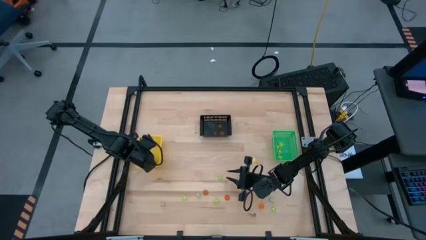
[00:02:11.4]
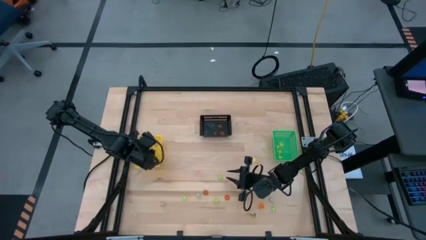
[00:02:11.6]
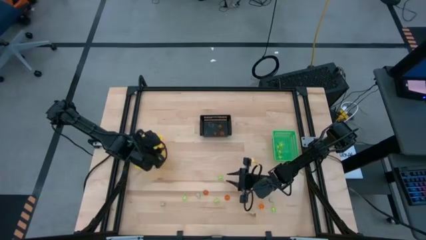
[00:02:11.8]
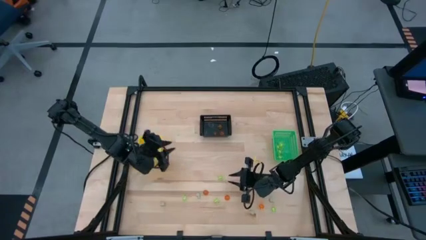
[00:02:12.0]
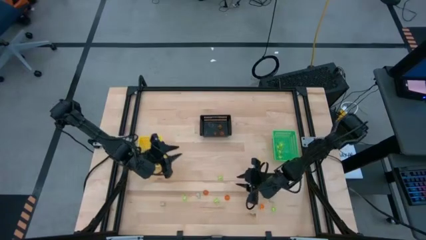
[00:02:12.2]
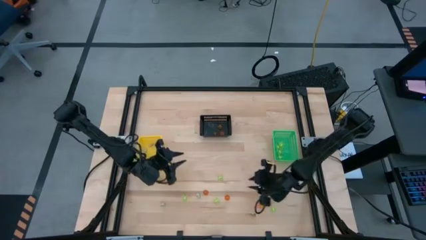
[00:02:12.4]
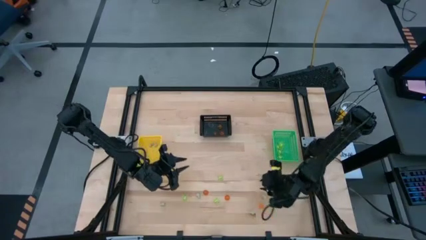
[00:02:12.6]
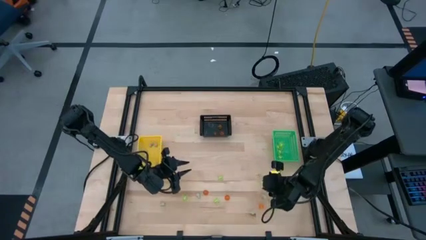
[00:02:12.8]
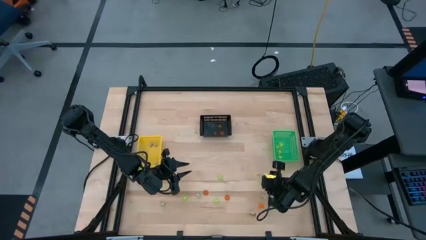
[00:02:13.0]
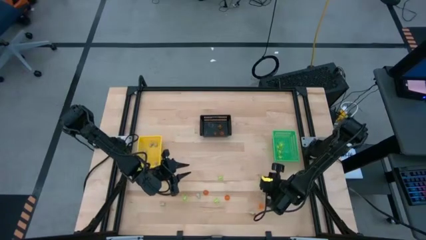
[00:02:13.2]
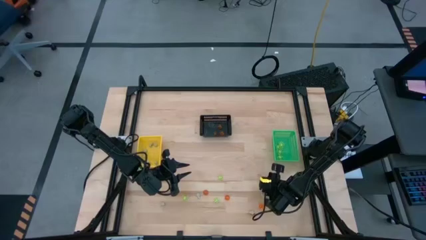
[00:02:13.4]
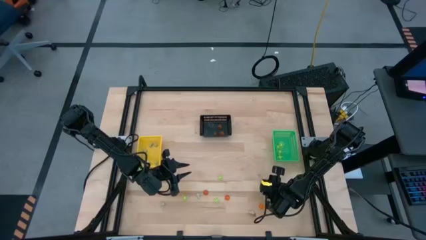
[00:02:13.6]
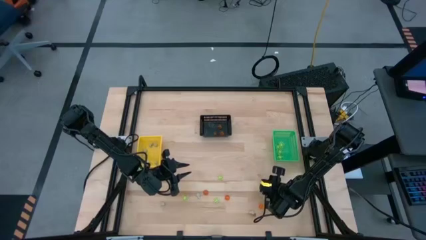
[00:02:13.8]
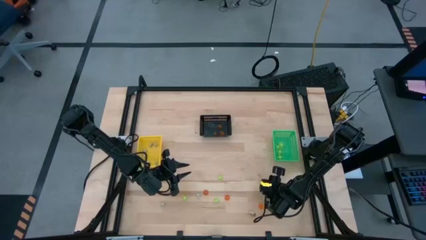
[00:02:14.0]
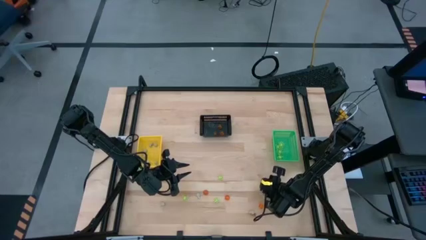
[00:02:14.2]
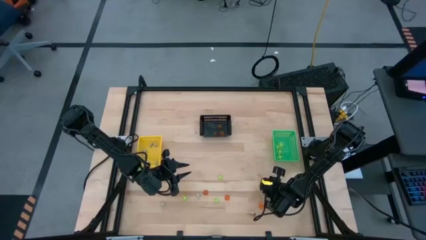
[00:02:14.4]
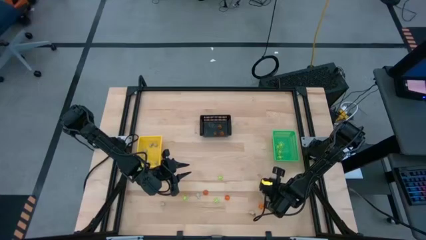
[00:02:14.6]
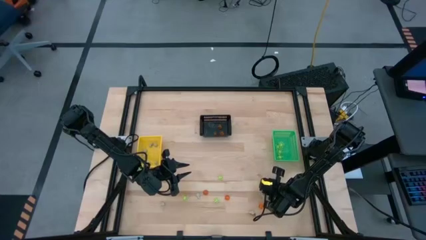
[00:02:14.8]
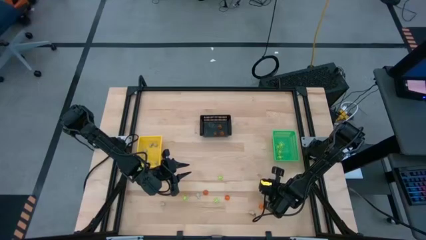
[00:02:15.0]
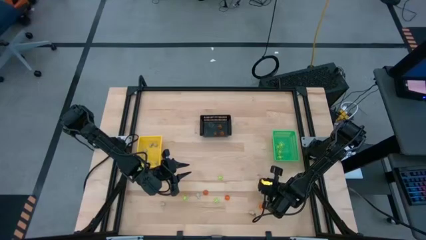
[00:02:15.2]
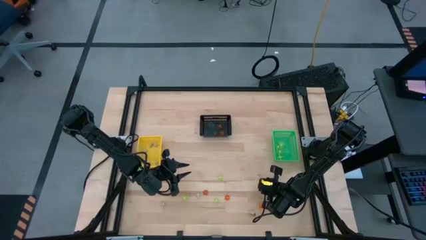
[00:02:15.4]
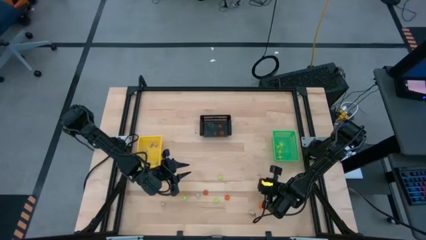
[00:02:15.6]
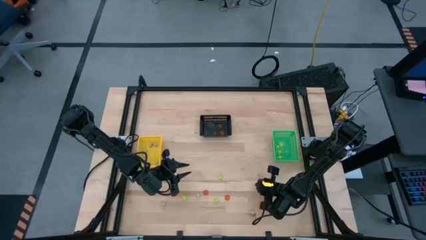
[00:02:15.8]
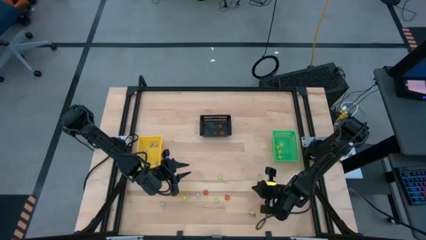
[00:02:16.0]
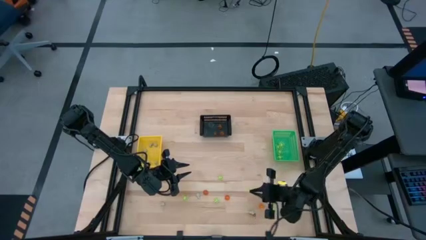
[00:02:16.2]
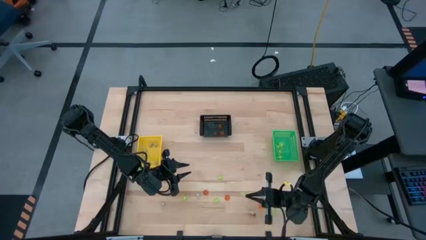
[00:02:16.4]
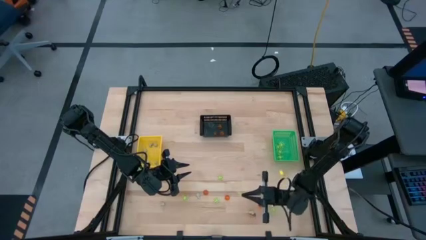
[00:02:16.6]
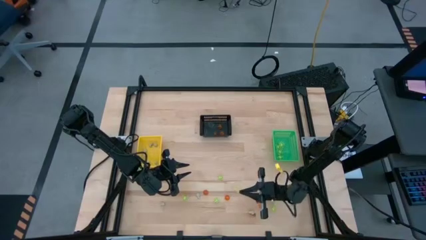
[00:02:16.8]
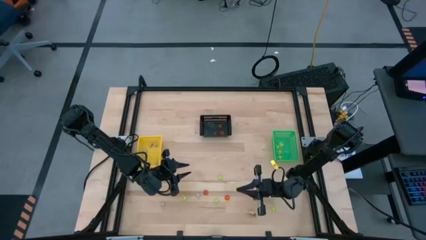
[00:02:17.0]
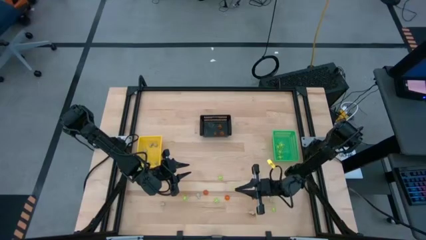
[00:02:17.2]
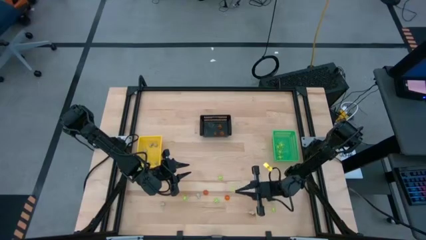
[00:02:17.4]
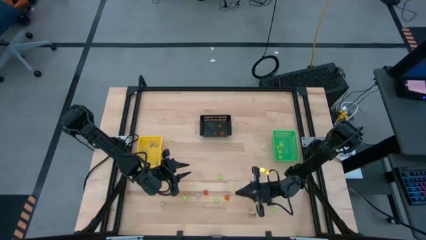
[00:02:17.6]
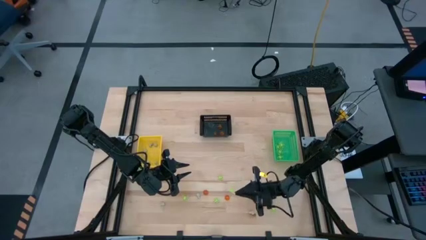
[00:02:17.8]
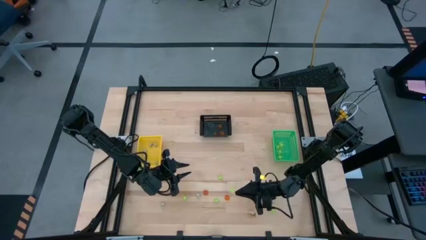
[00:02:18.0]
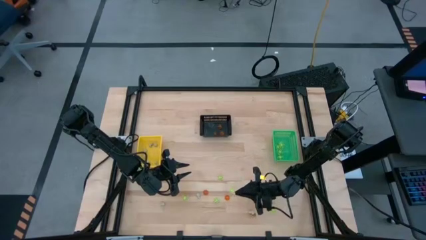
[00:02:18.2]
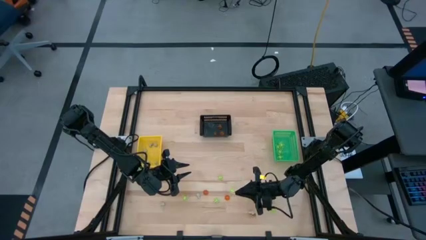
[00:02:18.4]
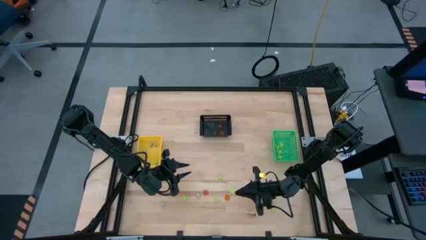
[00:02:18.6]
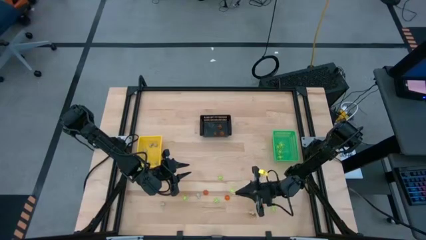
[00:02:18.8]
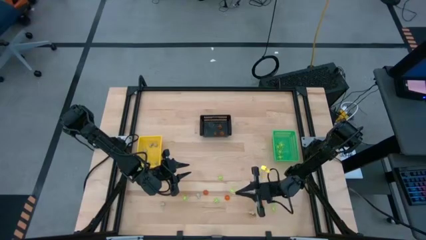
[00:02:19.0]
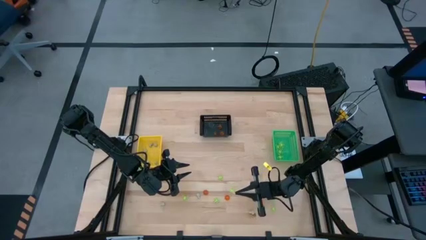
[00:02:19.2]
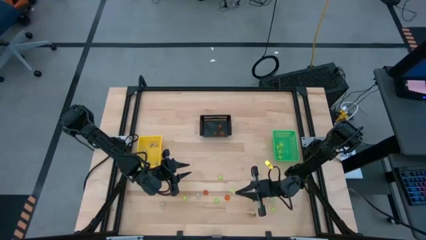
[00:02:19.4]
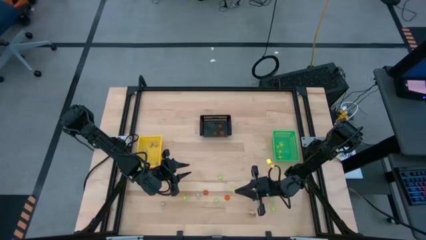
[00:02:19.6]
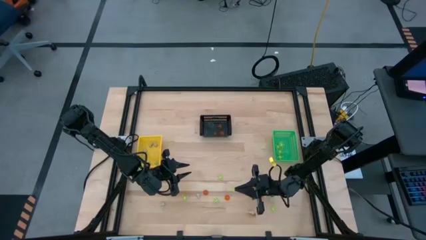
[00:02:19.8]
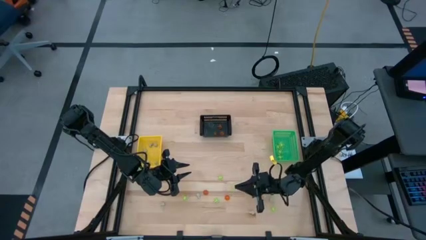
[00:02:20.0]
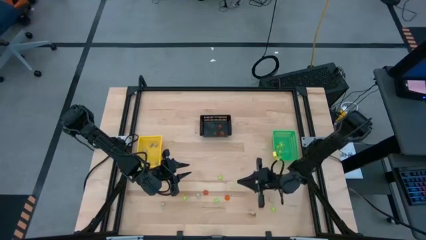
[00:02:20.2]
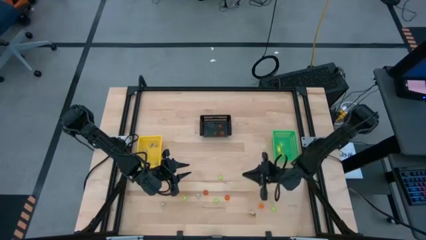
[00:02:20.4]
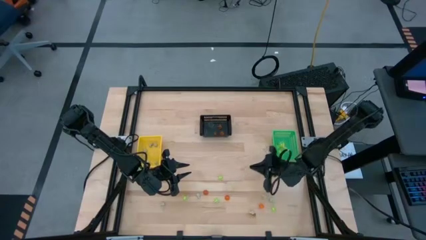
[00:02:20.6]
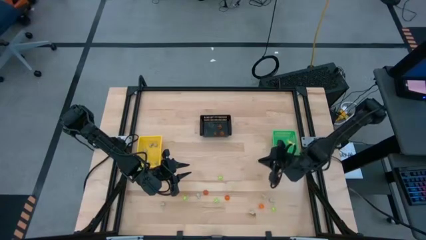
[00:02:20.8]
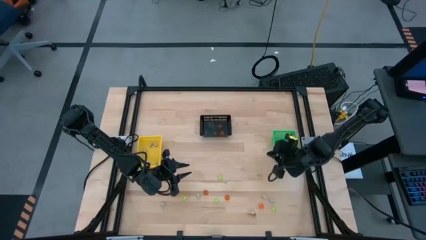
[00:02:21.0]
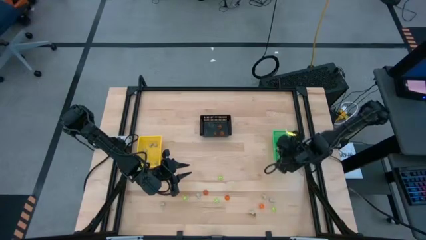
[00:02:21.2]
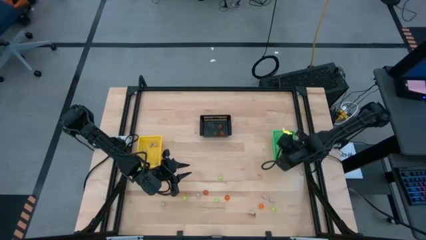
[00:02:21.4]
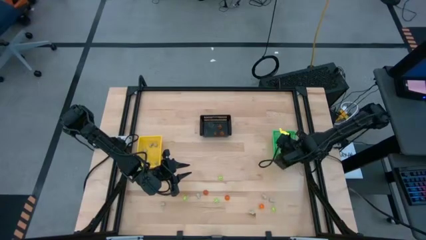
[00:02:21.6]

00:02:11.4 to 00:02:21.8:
Task: Sort Halloween decoration
Put the green spider toy into the green bin

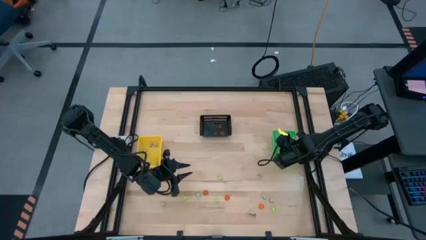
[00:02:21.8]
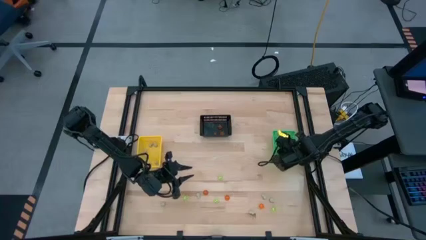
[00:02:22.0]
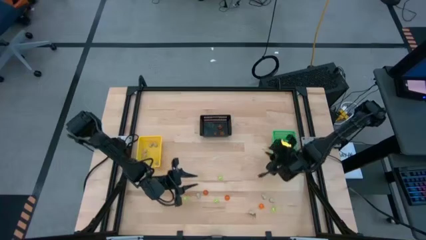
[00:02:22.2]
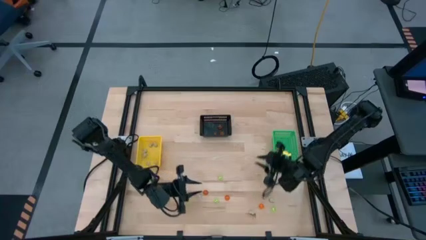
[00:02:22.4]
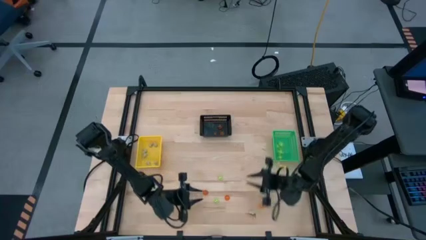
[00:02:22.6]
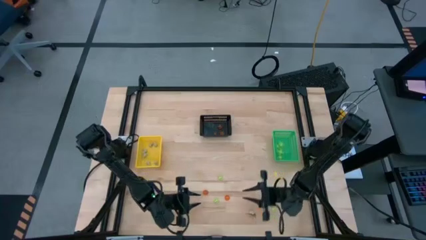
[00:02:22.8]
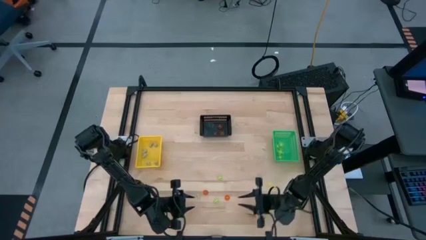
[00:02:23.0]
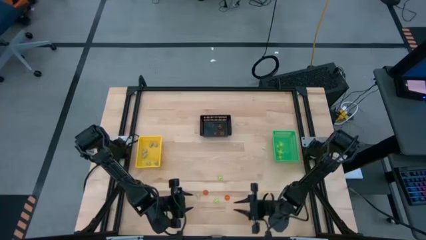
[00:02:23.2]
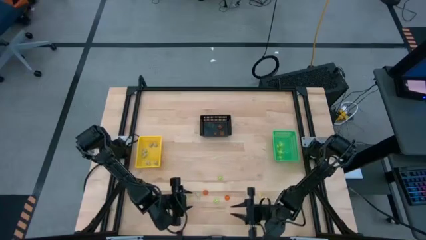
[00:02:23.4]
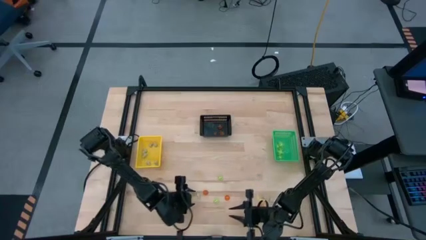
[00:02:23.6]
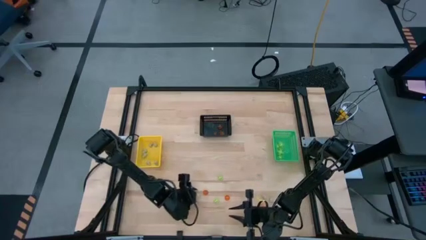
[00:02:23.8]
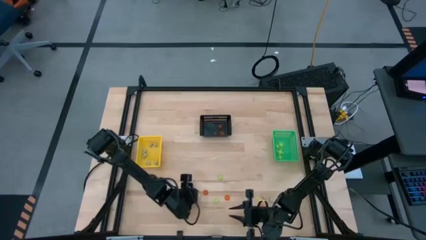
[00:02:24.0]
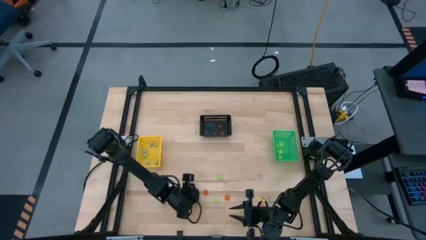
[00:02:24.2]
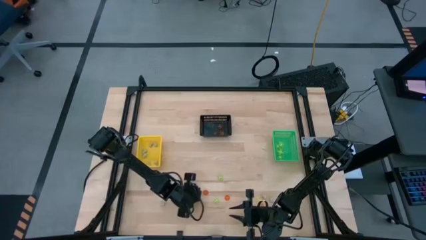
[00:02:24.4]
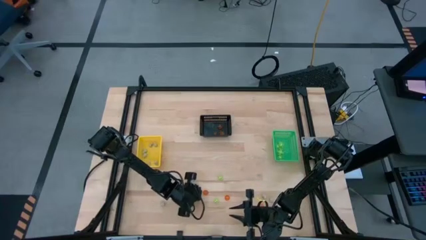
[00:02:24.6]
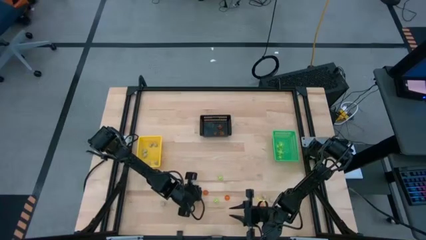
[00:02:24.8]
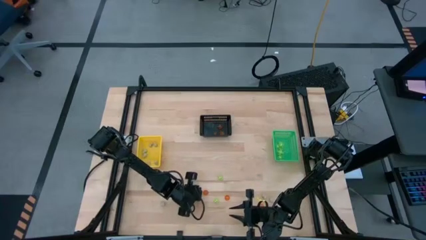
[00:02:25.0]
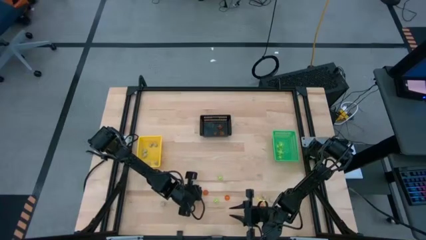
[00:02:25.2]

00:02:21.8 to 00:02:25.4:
Put the white skull toy into the yellow bin
